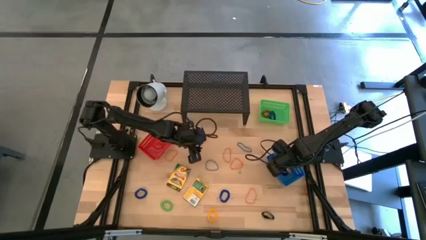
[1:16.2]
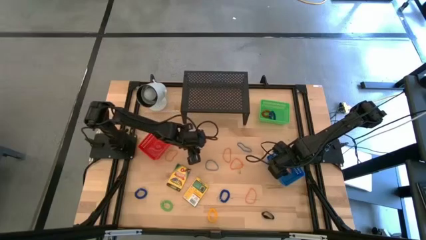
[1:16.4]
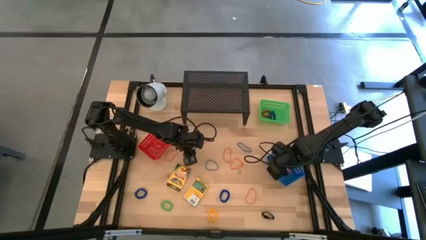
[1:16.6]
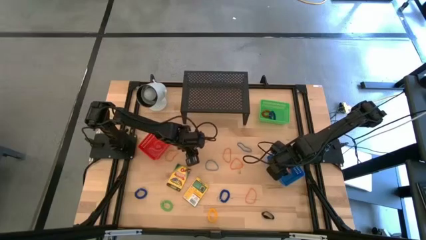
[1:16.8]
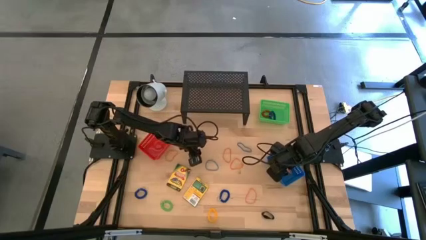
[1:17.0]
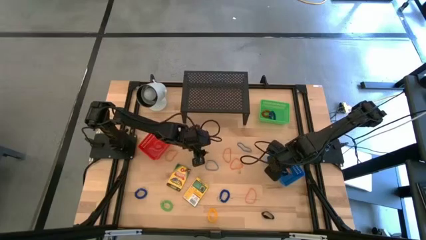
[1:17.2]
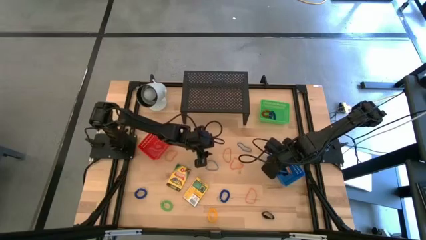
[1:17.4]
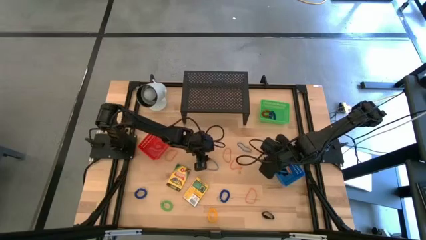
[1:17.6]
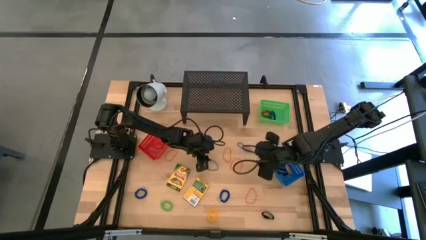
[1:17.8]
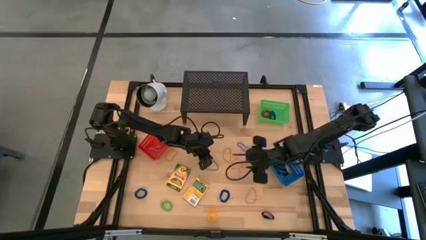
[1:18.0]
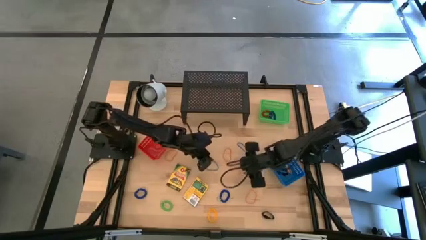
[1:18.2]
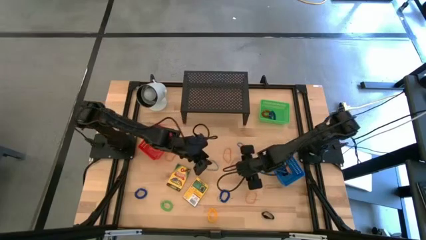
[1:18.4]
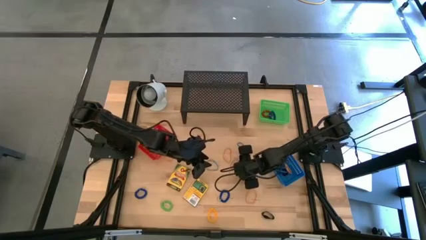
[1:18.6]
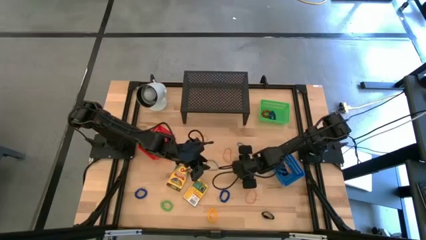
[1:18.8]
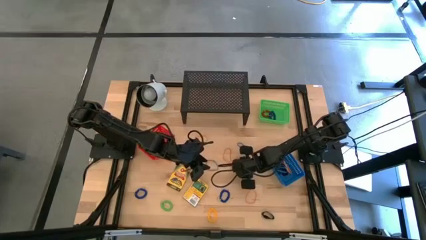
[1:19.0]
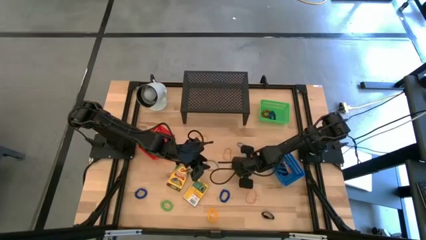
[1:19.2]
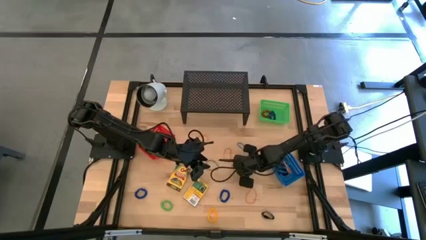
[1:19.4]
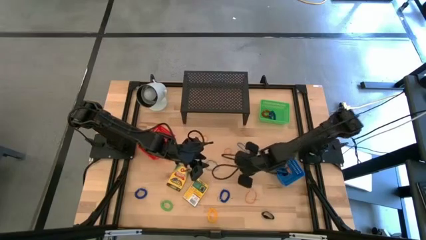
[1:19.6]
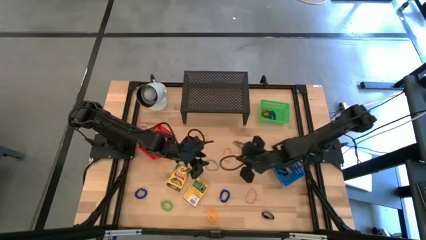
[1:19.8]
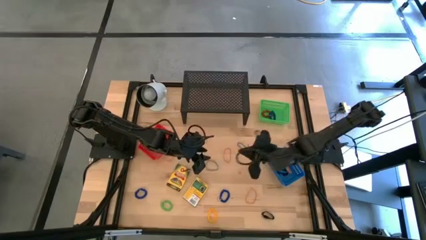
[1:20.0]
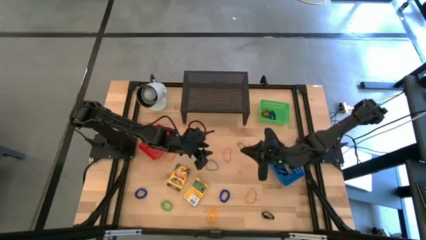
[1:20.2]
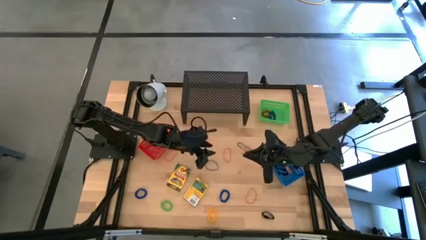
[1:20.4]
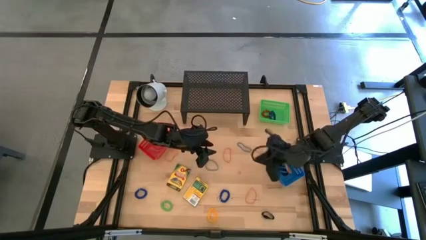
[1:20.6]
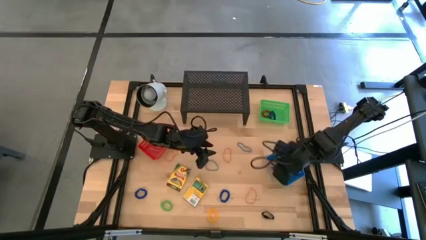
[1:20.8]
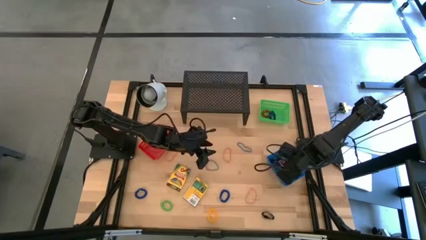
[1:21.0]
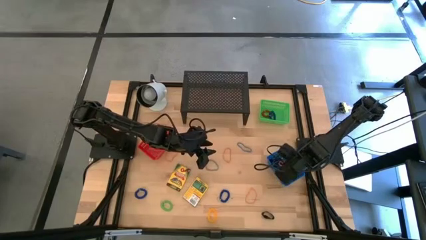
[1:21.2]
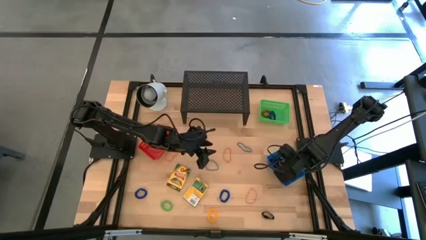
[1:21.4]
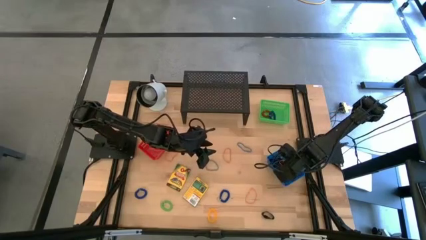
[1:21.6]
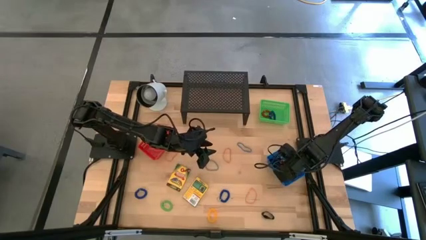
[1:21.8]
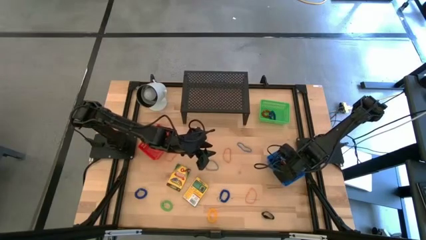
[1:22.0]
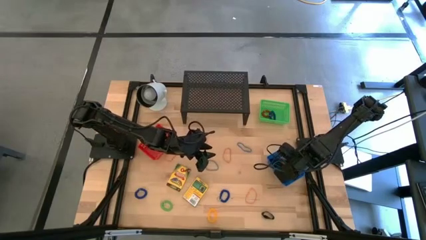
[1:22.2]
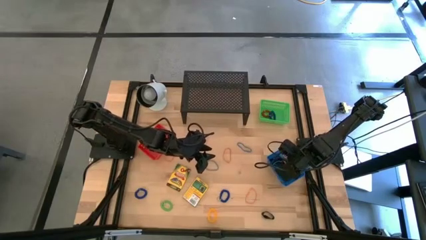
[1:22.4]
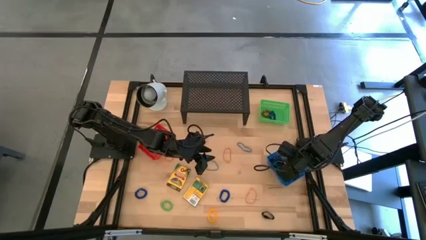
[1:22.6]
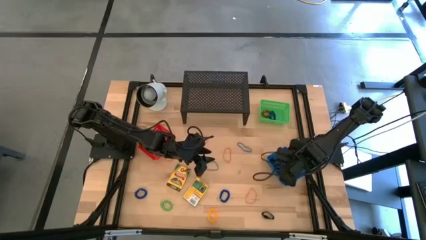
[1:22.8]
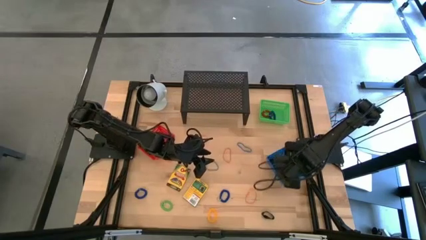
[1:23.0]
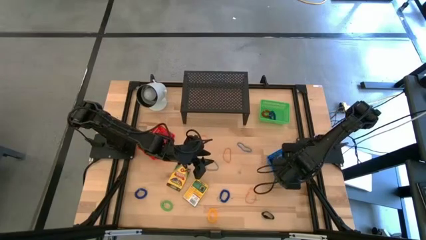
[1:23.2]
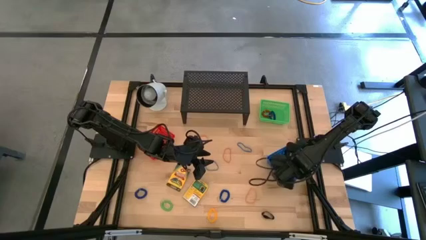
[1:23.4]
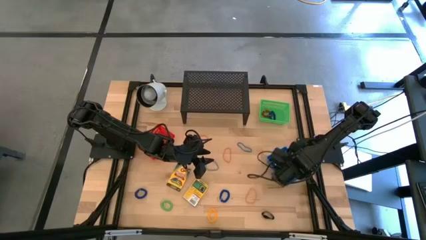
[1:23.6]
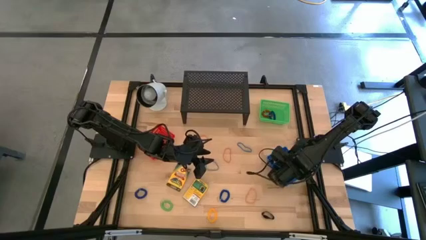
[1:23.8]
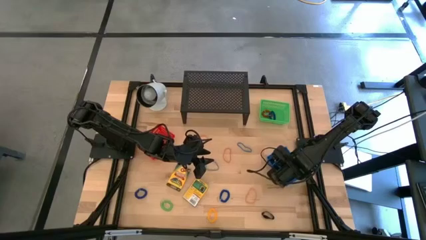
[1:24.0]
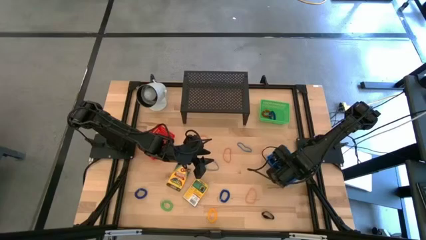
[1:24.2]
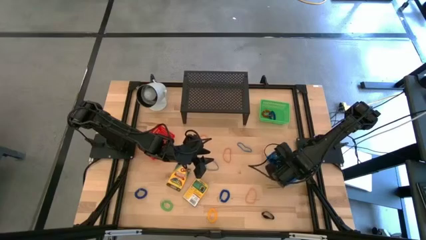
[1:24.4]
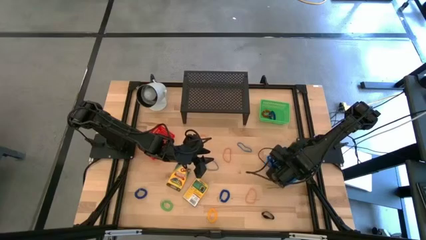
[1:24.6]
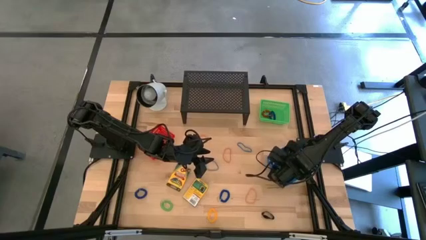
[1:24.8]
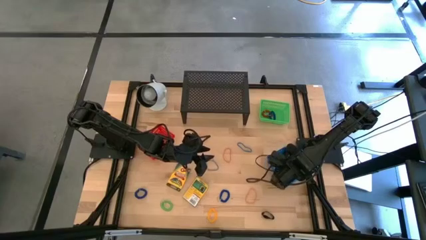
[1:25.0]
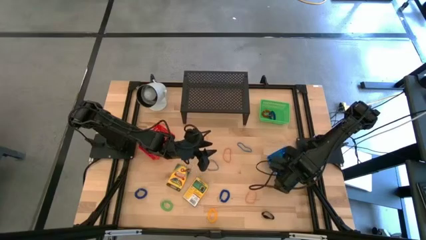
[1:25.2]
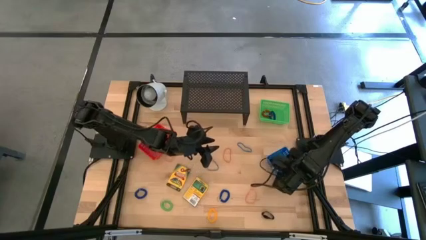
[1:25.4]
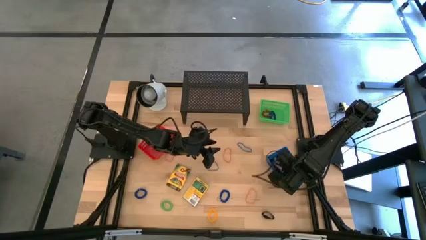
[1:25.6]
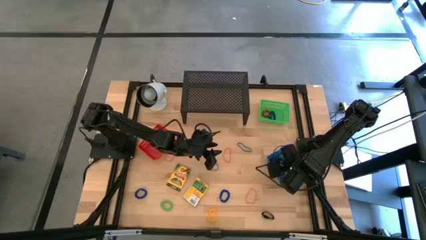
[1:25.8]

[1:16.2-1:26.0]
Task: Pick & Place Office Desk Supplies
Put the orange rubber band into the blue bin

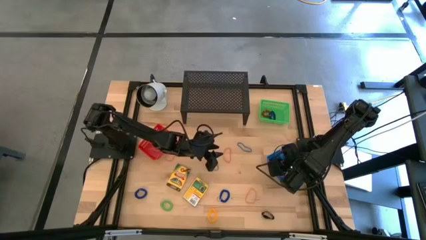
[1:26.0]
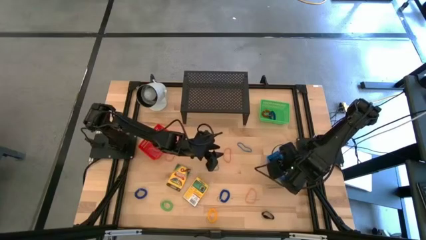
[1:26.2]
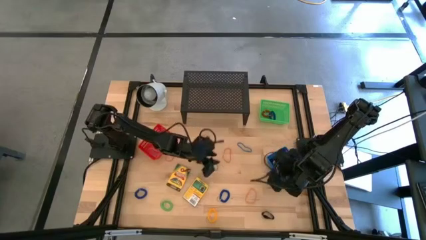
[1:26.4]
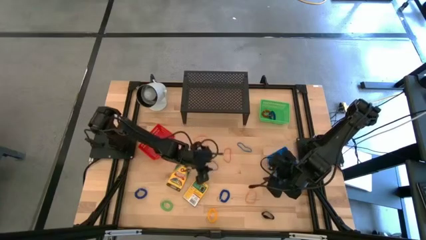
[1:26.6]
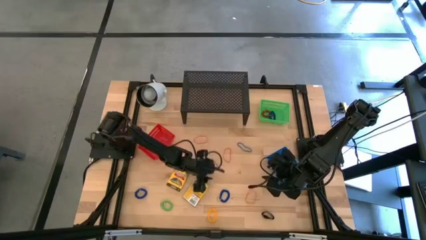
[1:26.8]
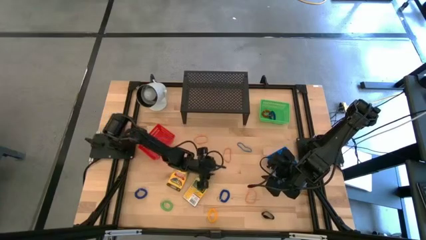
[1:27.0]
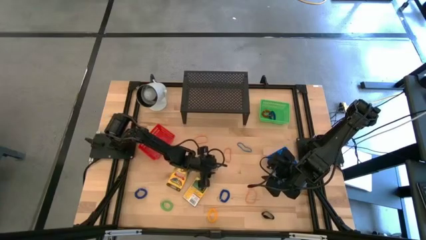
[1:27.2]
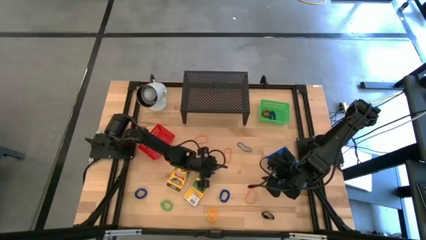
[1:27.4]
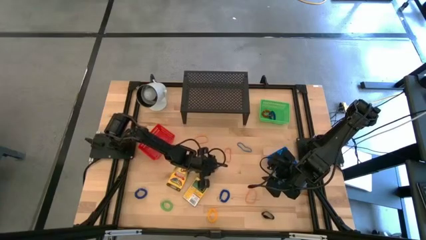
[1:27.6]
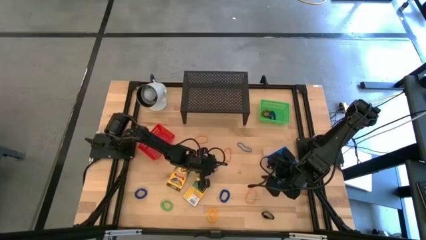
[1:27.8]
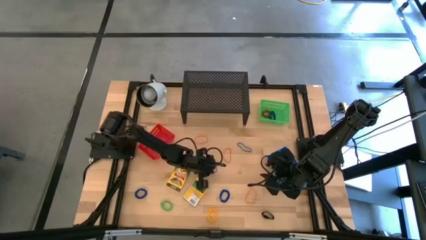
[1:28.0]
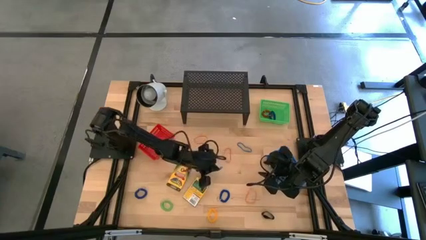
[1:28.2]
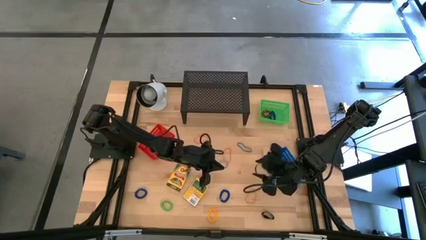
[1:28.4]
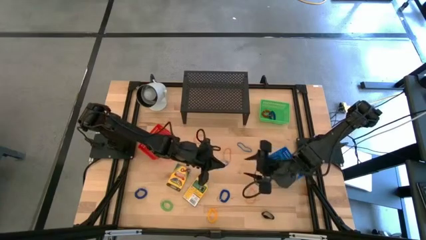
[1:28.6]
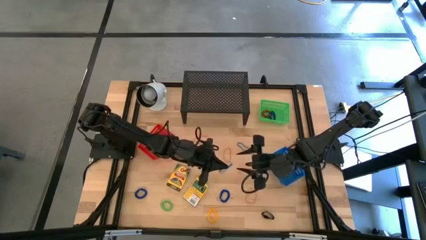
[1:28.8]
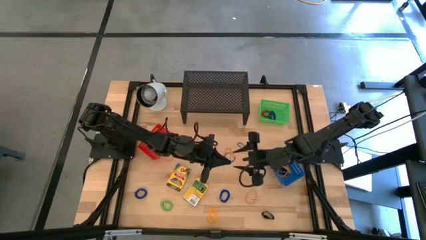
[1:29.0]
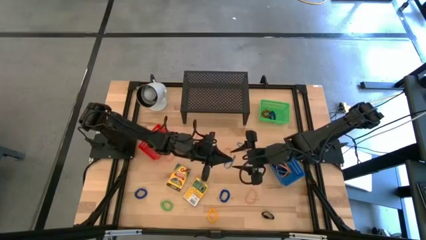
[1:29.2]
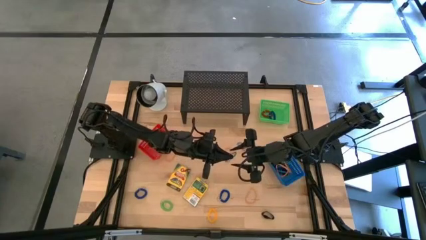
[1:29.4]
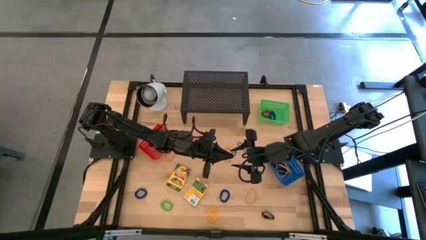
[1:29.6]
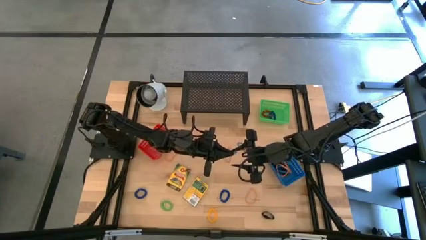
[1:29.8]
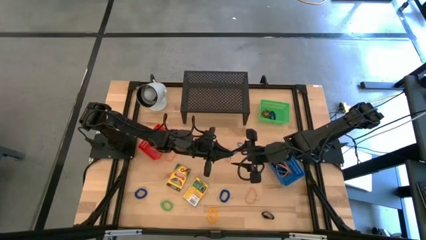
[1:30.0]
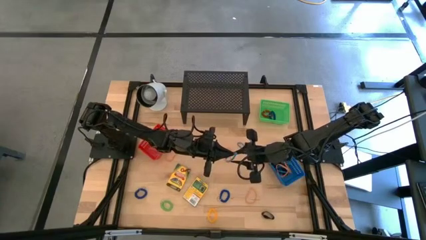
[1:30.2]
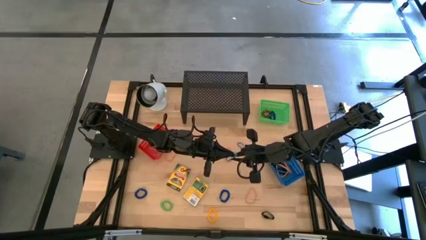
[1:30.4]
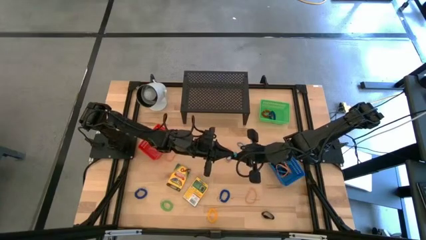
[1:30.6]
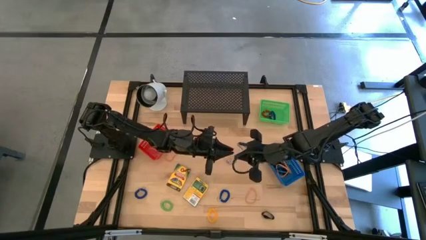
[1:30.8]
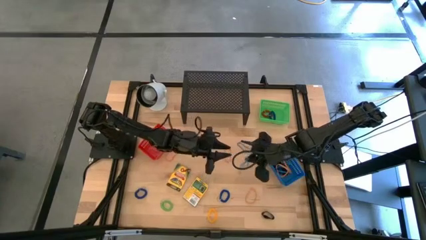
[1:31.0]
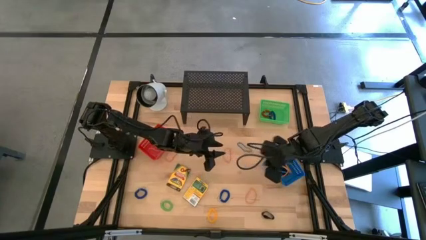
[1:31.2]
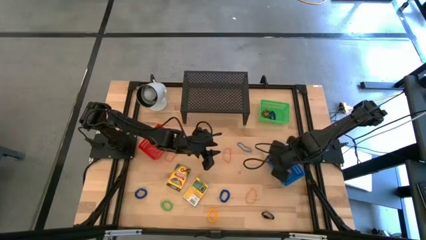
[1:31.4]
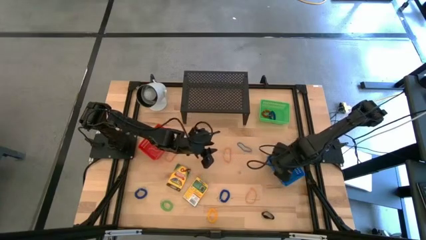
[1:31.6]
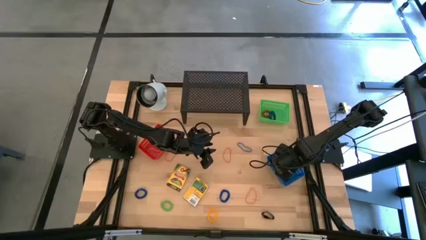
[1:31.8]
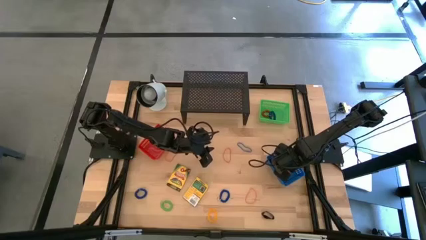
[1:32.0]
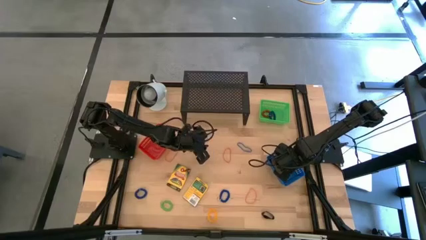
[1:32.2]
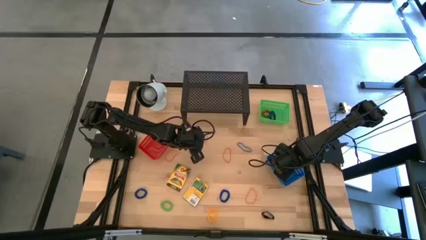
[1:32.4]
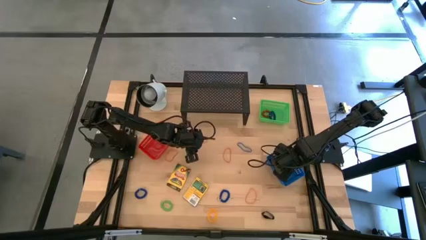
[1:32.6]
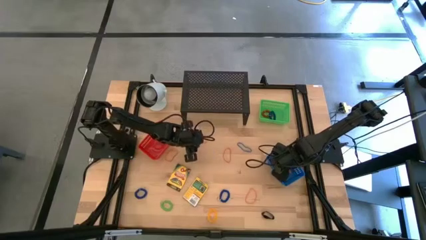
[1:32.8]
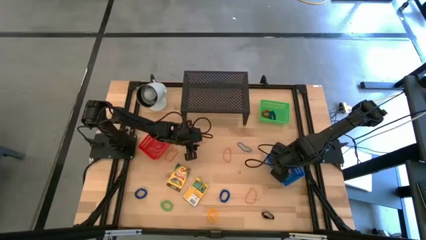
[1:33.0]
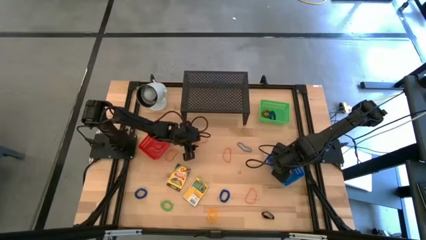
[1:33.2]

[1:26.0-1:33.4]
Put the blue rubber band into the blue bin
